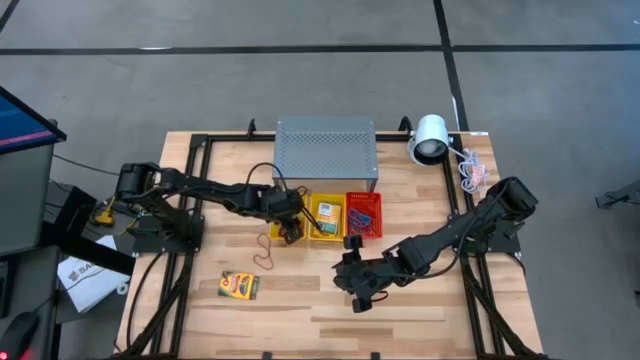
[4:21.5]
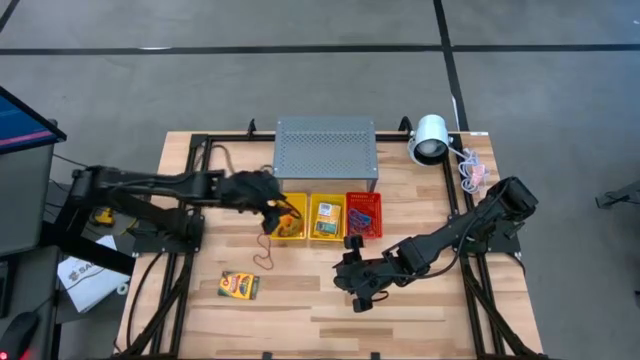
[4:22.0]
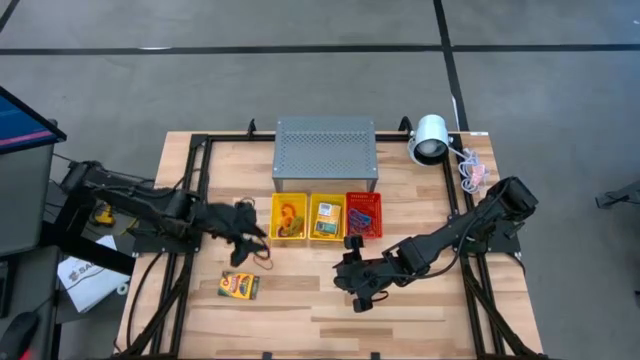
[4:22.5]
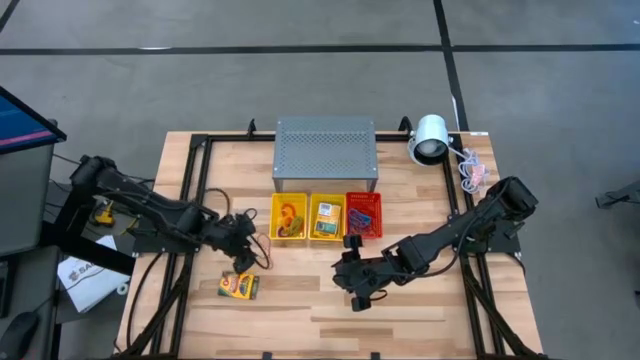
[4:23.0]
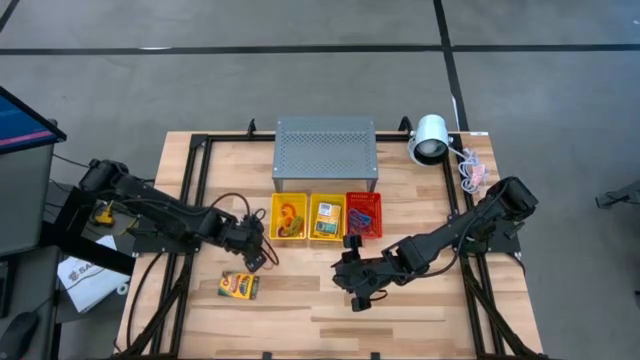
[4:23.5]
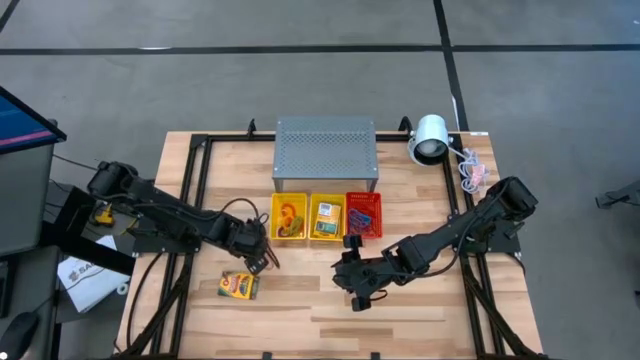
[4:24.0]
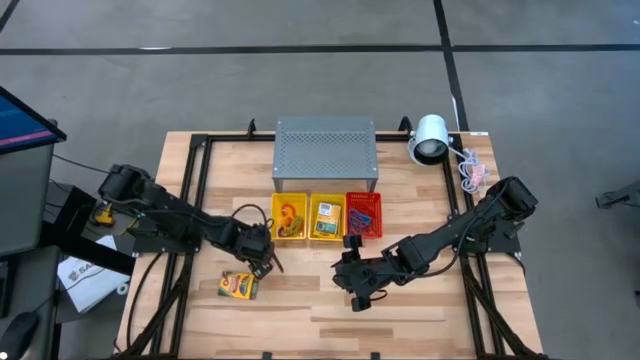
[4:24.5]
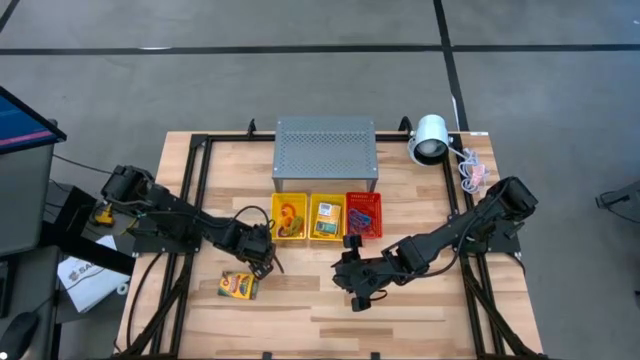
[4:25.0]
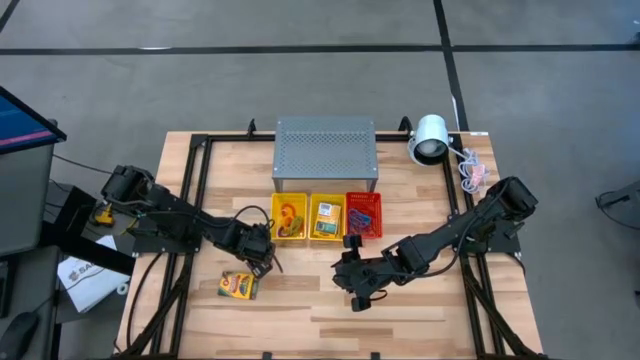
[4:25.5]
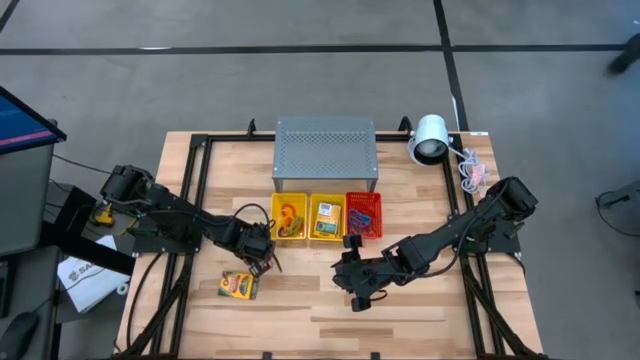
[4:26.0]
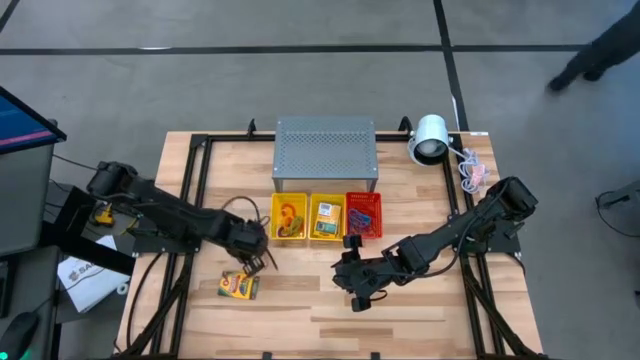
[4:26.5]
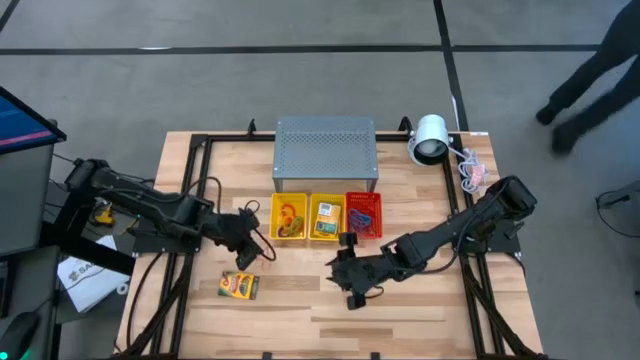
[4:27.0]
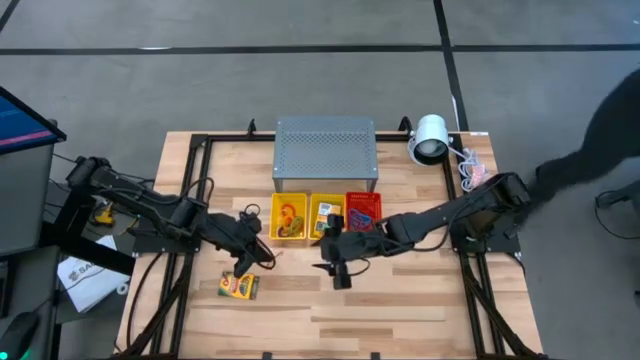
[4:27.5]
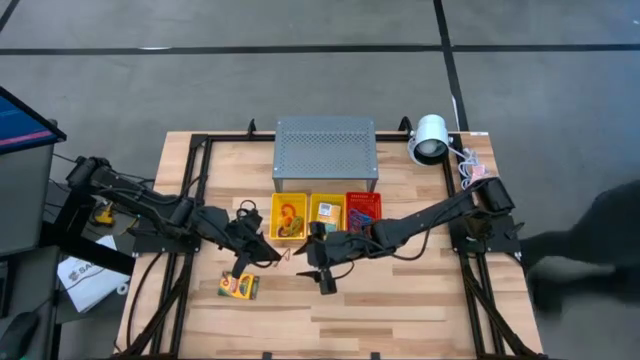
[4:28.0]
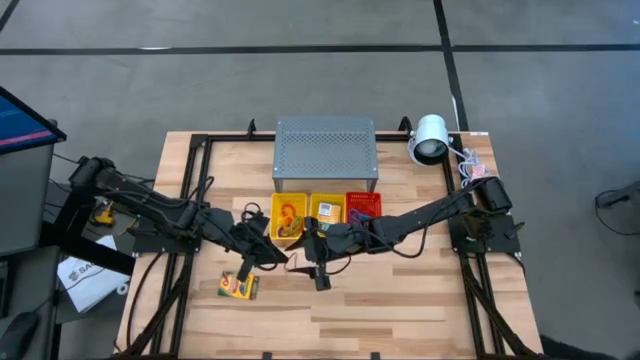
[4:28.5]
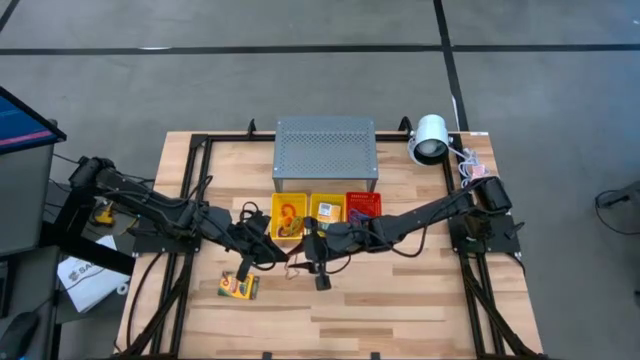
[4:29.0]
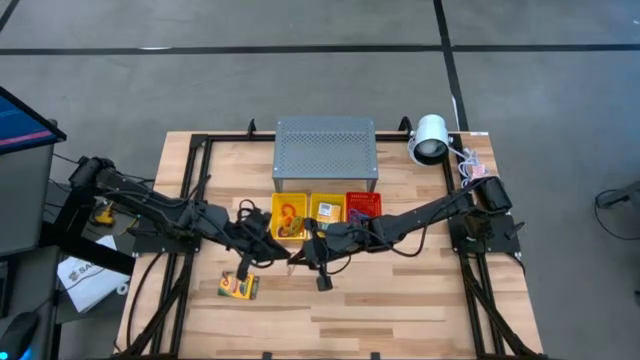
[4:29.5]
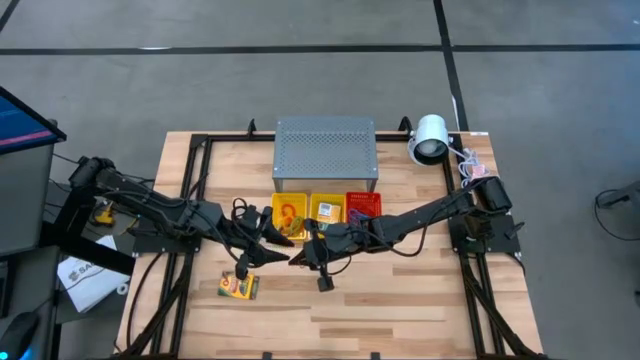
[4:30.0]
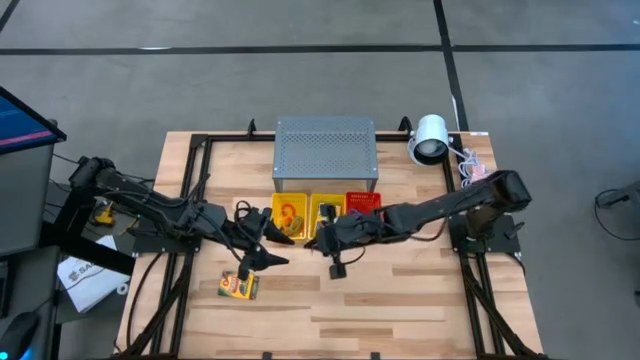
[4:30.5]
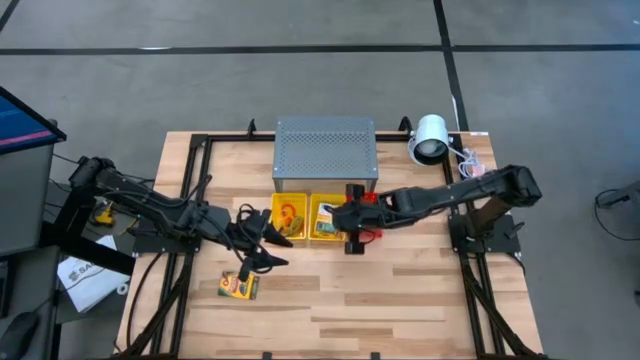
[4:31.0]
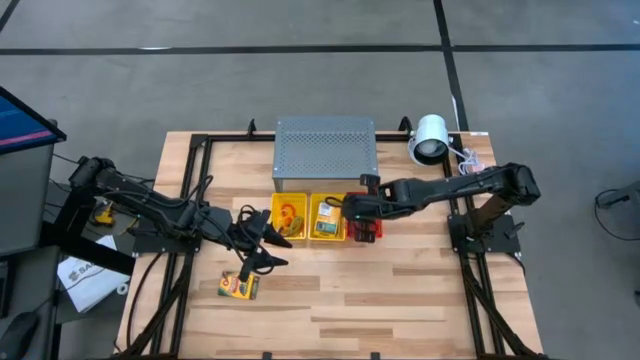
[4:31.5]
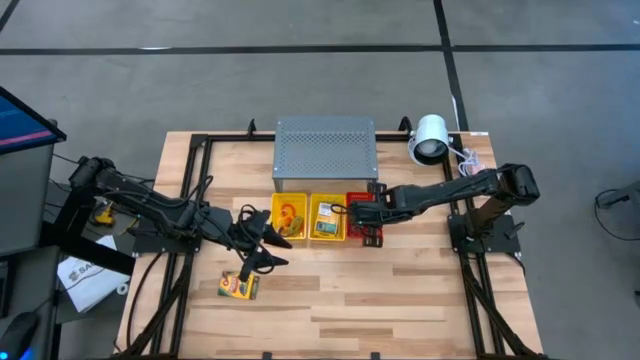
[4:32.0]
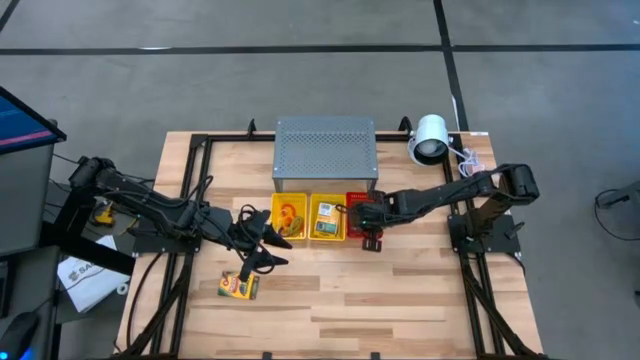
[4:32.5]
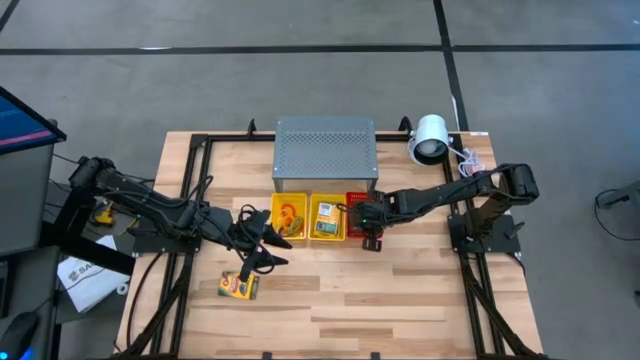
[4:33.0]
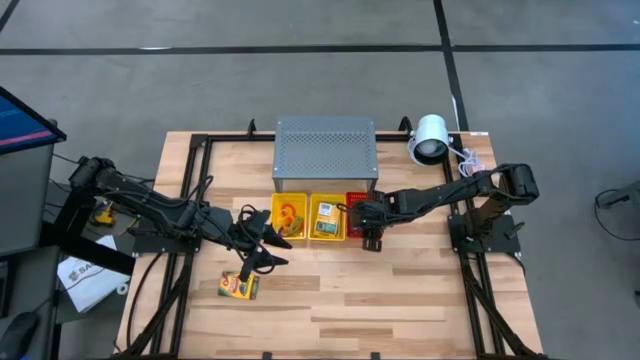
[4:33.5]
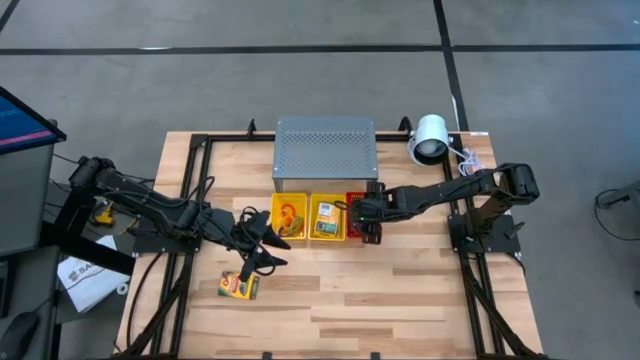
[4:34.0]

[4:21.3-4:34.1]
Task: Pick & Place Office Desk Supplies
Put the red rubber band into the red bin

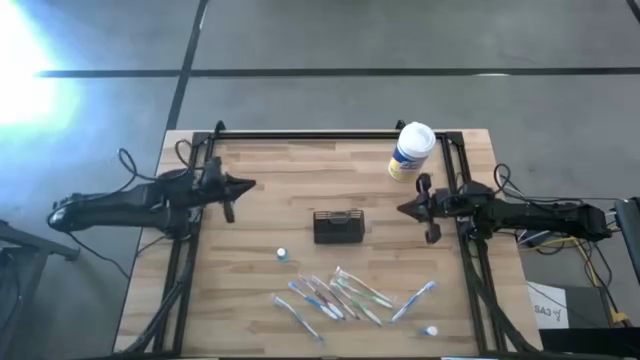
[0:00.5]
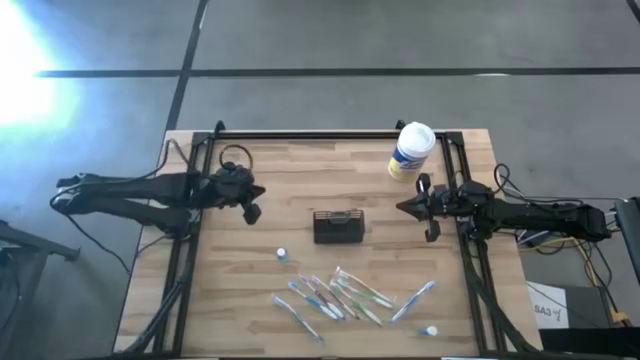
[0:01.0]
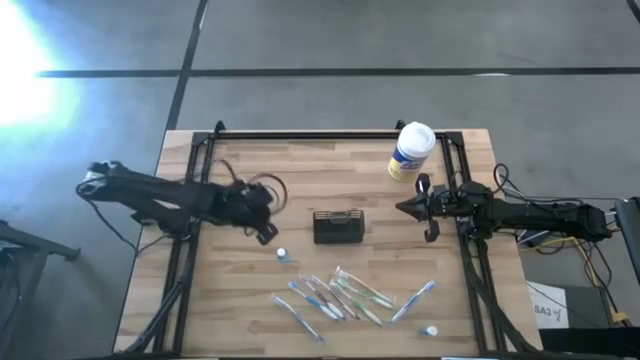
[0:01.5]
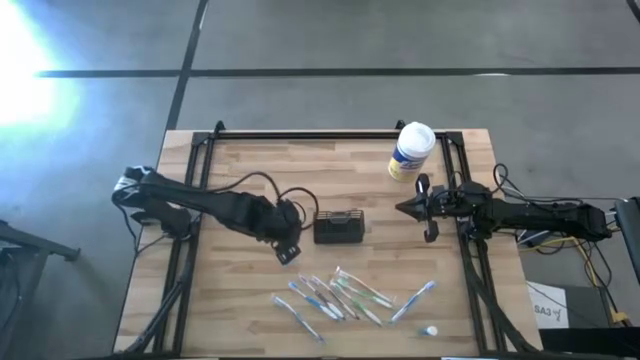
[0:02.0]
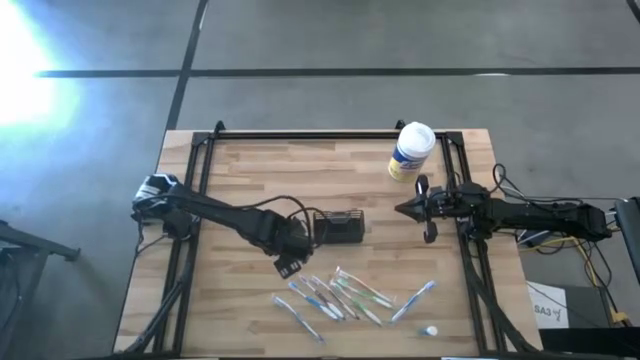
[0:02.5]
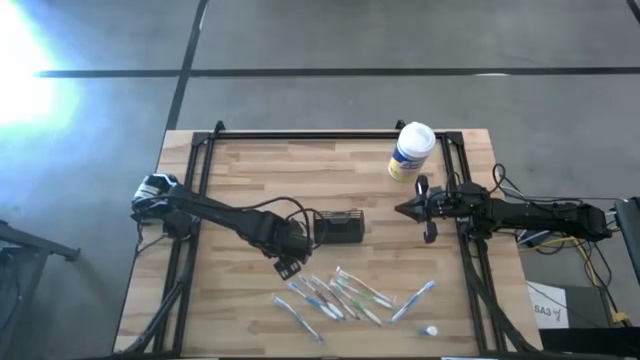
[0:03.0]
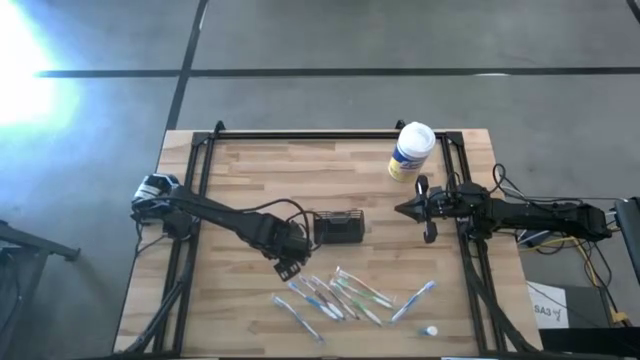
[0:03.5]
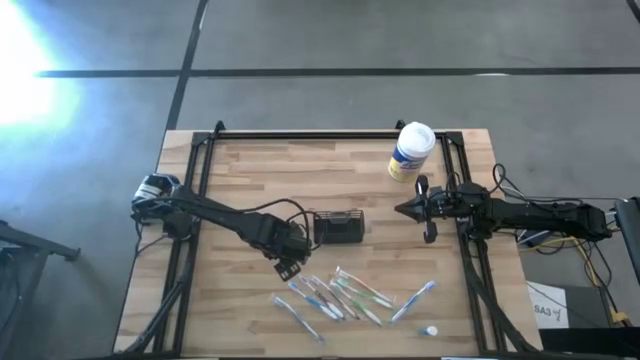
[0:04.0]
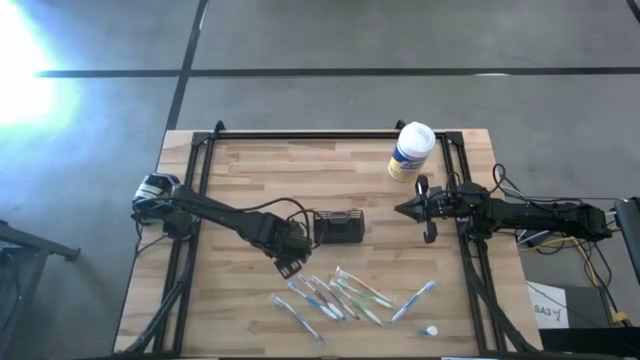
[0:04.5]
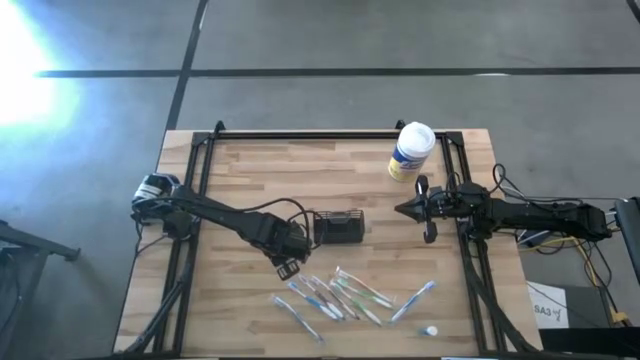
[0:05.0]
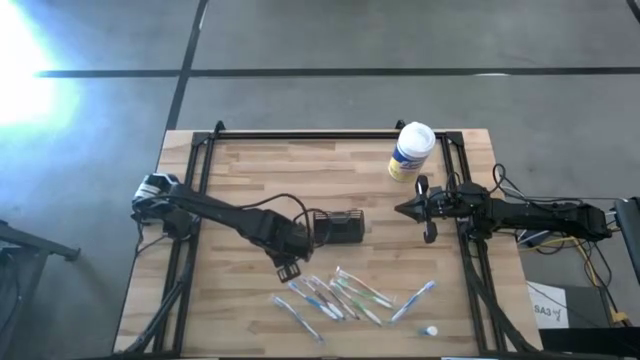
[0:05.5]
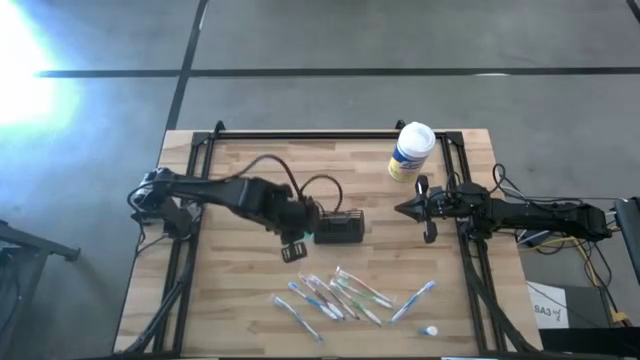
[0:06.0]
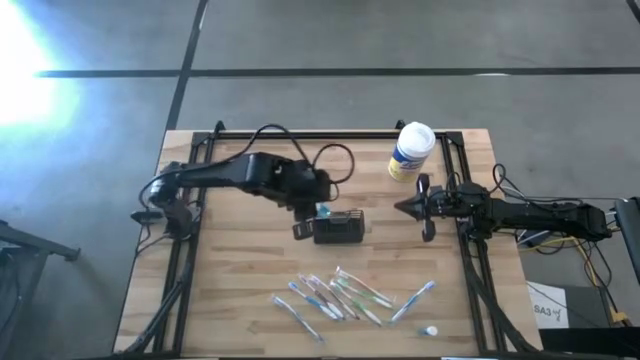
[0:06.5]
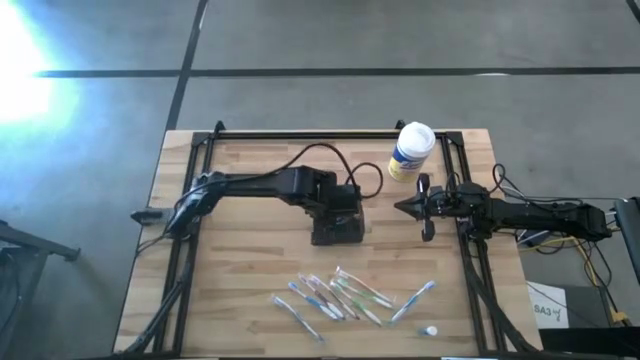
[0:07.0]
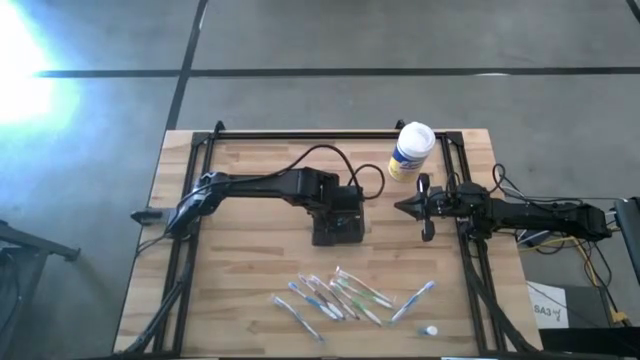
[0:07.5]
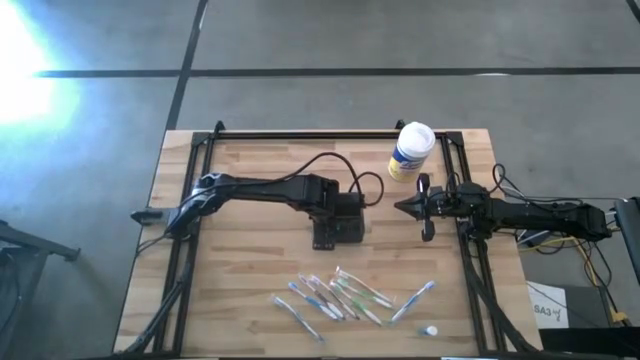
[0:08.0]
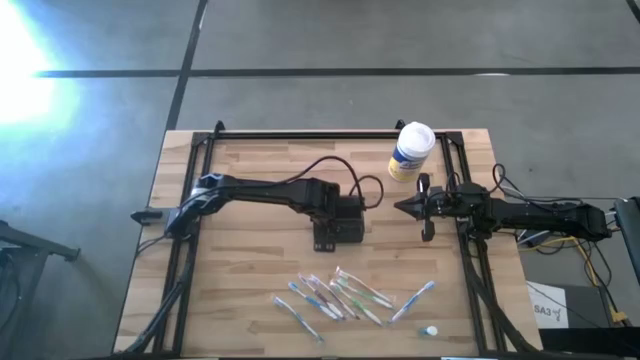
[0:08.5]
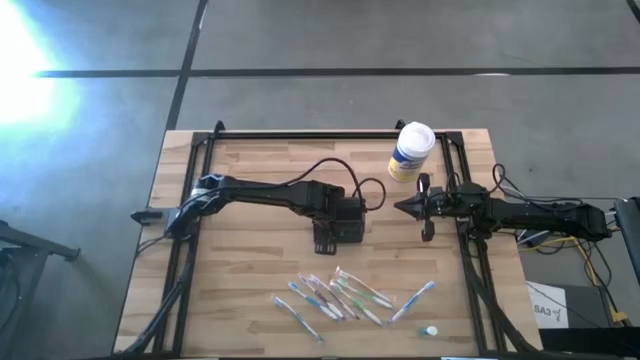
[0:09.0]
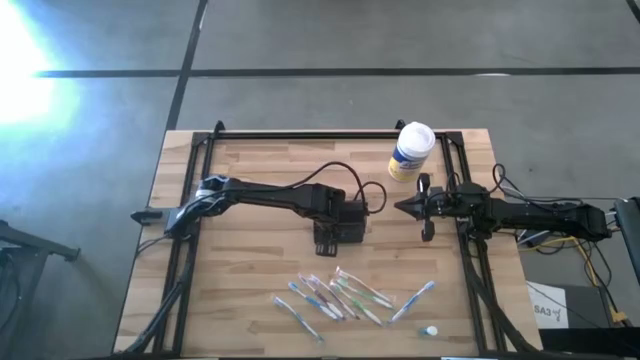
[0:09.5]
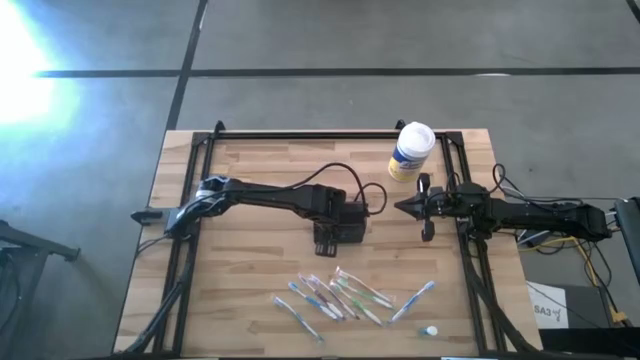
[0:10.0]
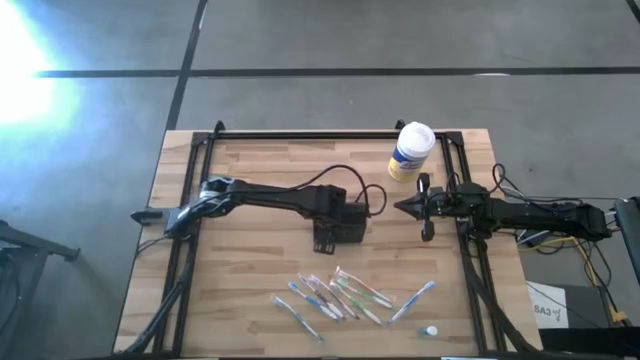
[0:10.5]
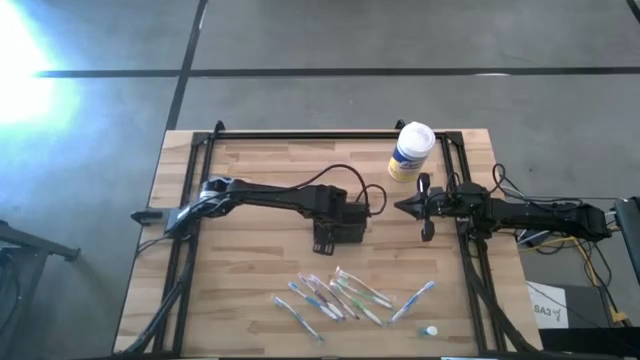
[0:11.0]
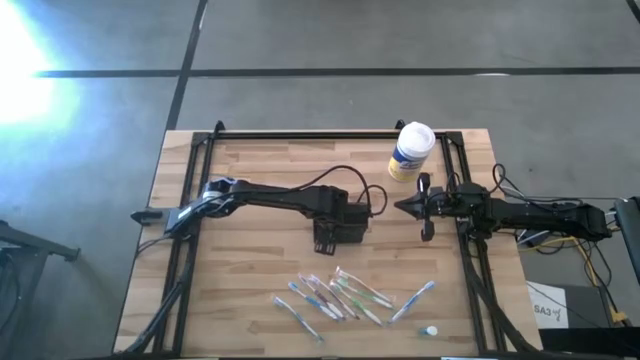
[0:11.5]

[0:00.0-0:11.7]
Task: Pick & Place toothbrushing station
Put the top blue mouthwash into the black mesh organizer
